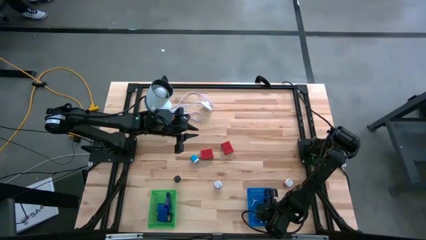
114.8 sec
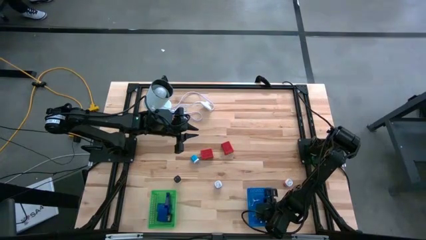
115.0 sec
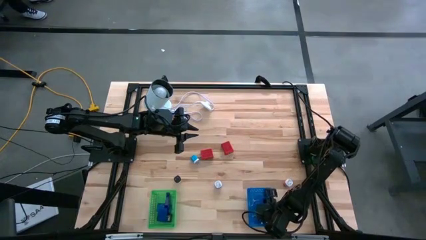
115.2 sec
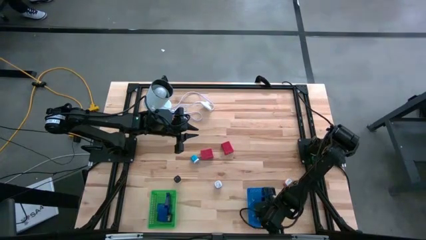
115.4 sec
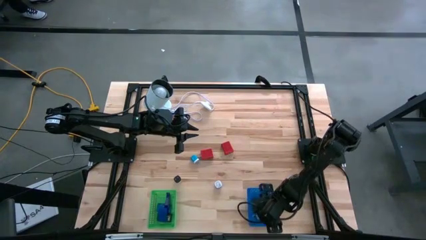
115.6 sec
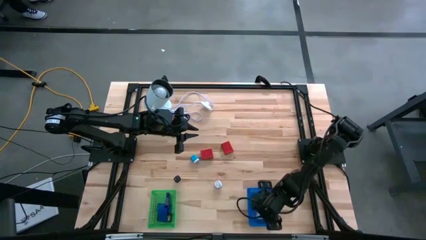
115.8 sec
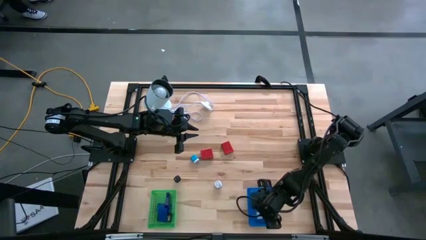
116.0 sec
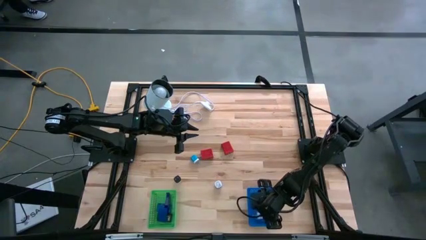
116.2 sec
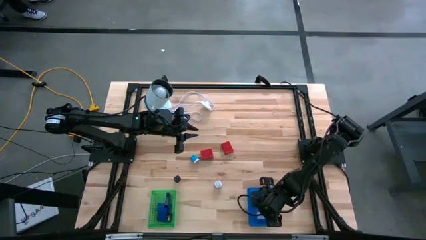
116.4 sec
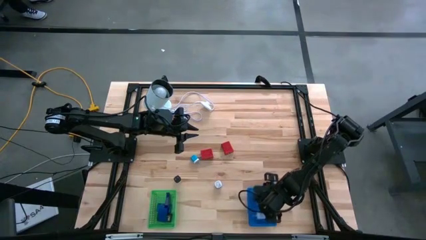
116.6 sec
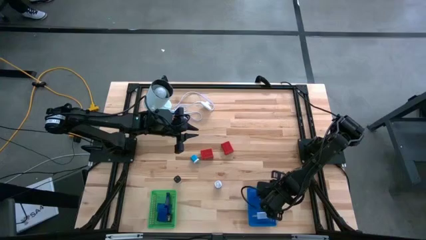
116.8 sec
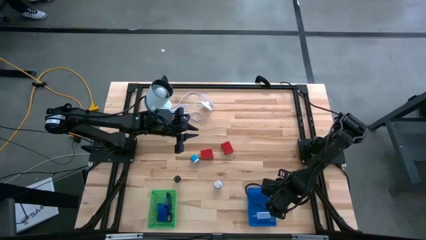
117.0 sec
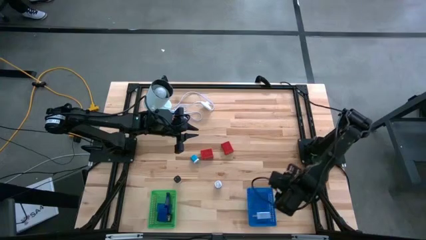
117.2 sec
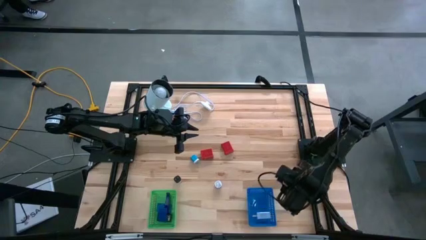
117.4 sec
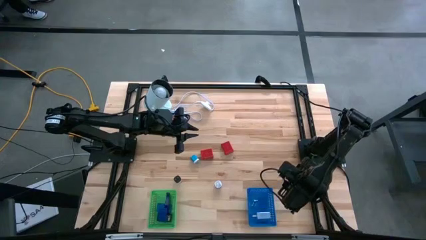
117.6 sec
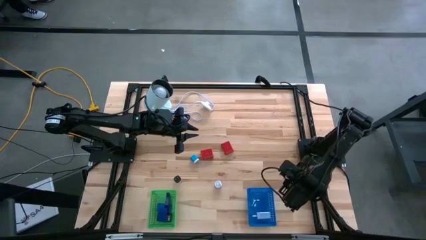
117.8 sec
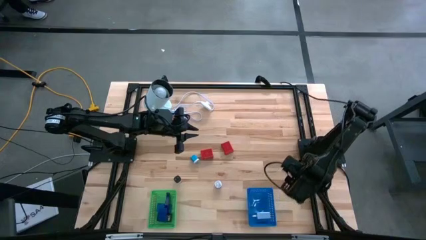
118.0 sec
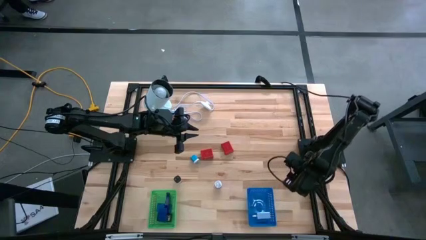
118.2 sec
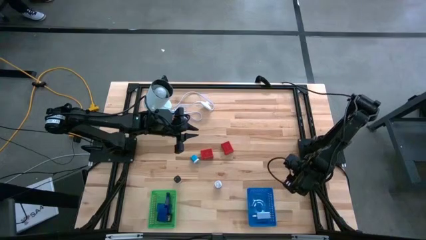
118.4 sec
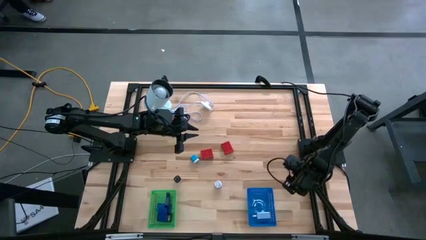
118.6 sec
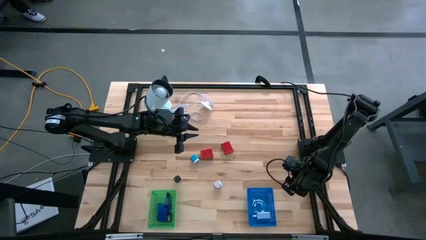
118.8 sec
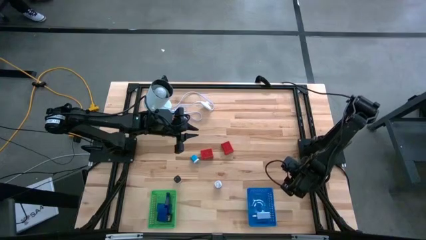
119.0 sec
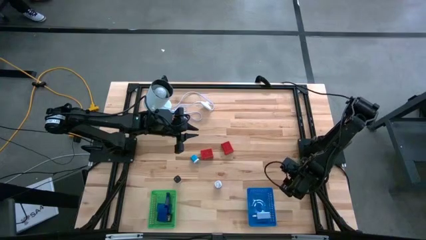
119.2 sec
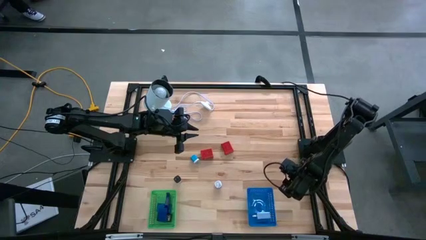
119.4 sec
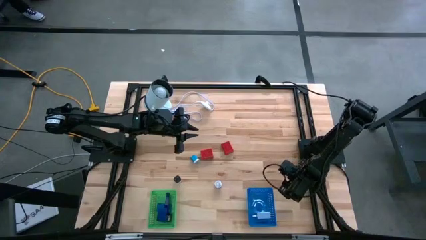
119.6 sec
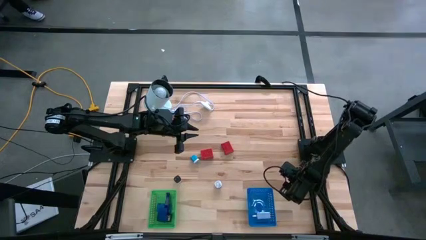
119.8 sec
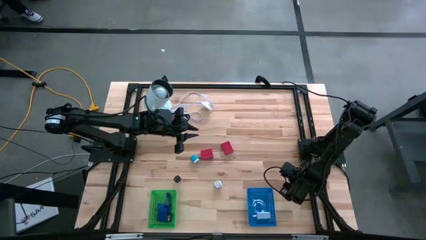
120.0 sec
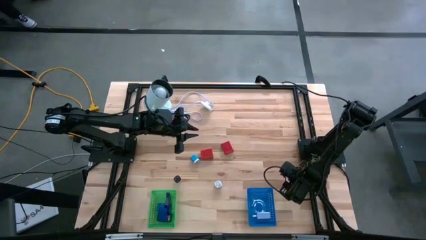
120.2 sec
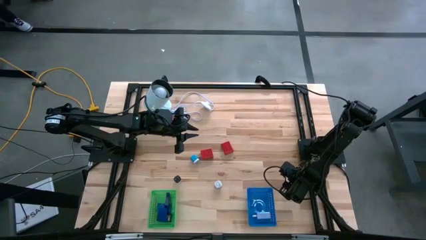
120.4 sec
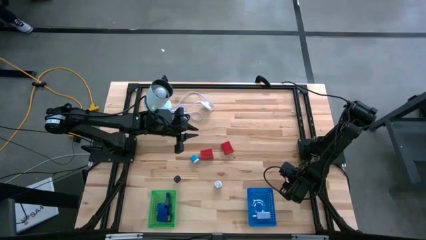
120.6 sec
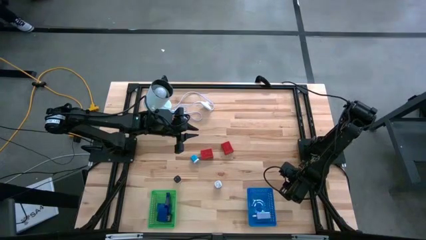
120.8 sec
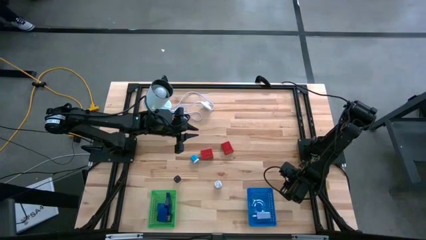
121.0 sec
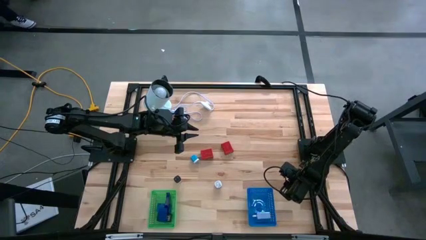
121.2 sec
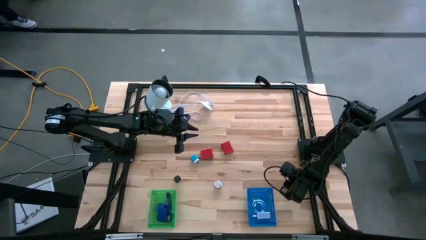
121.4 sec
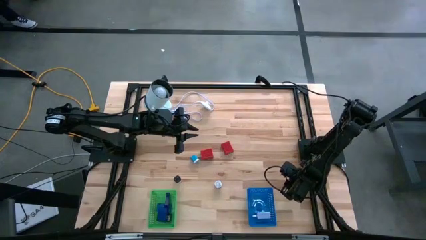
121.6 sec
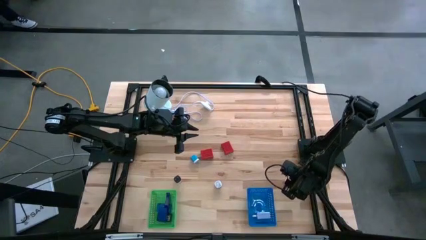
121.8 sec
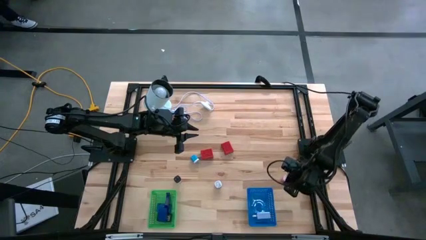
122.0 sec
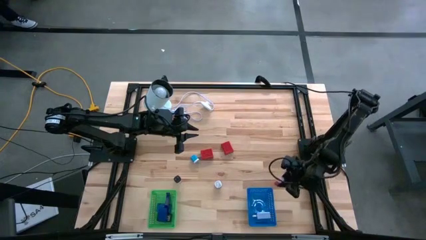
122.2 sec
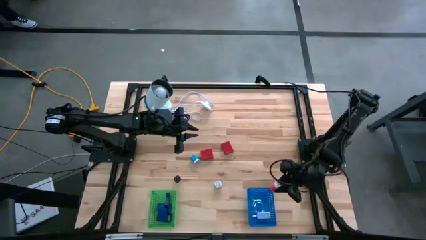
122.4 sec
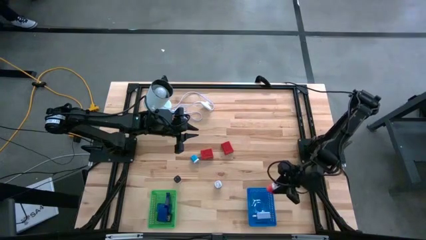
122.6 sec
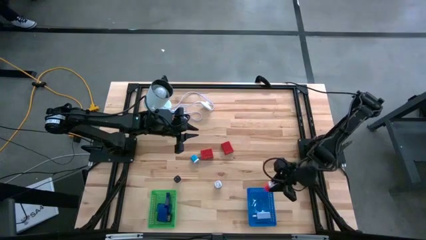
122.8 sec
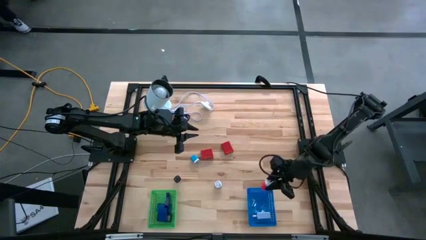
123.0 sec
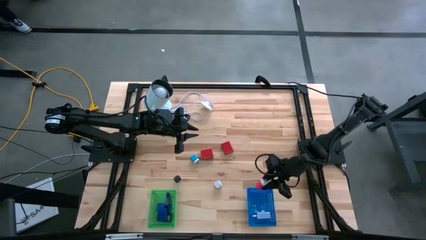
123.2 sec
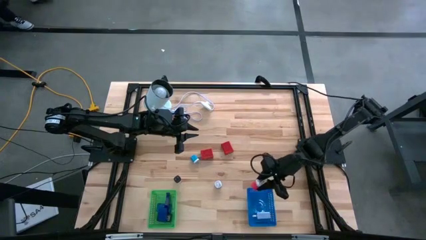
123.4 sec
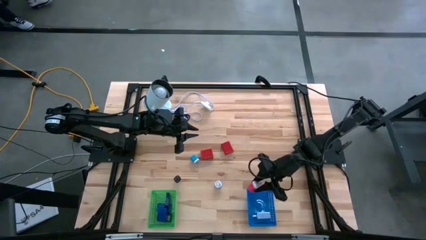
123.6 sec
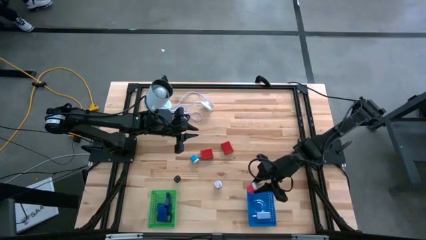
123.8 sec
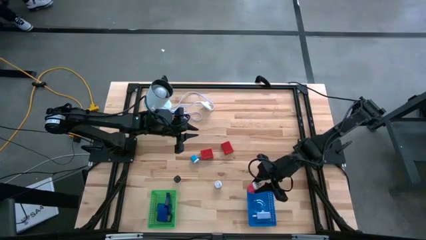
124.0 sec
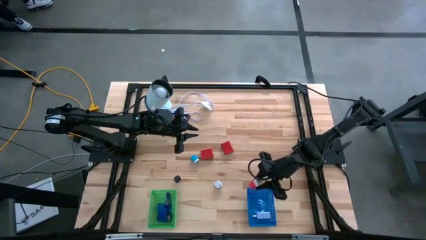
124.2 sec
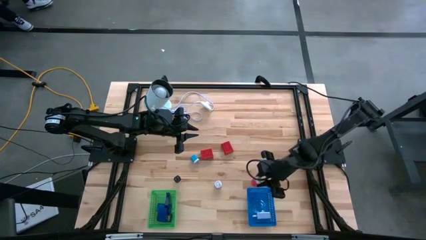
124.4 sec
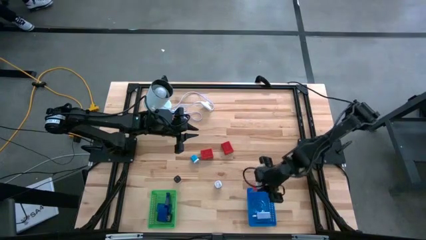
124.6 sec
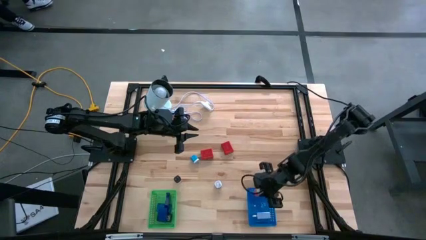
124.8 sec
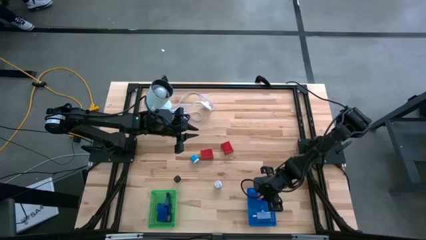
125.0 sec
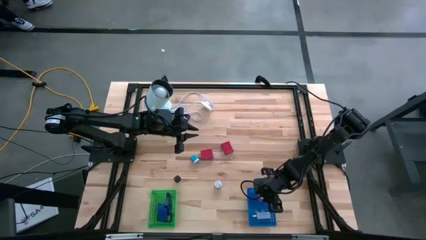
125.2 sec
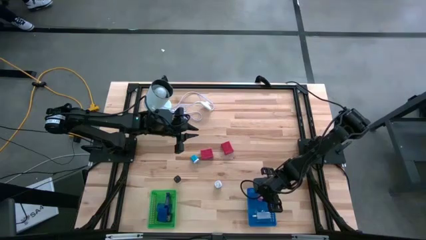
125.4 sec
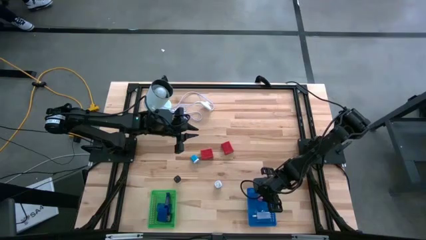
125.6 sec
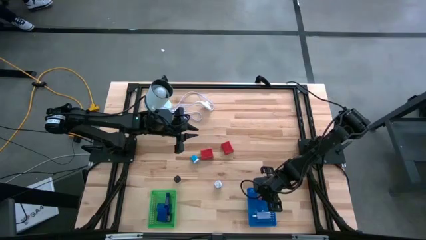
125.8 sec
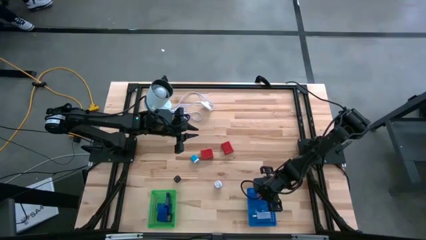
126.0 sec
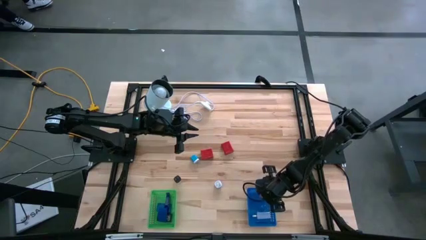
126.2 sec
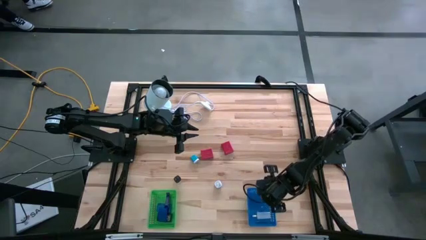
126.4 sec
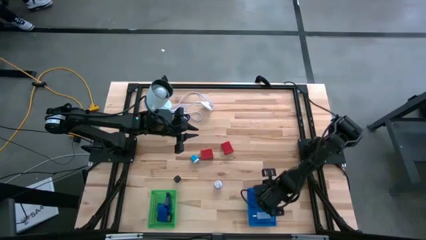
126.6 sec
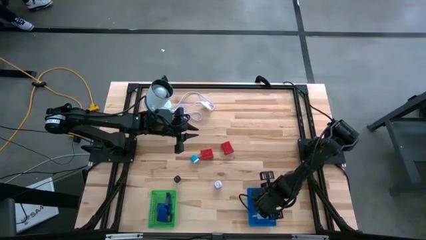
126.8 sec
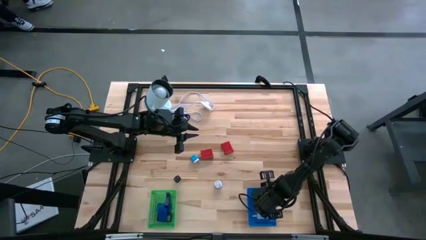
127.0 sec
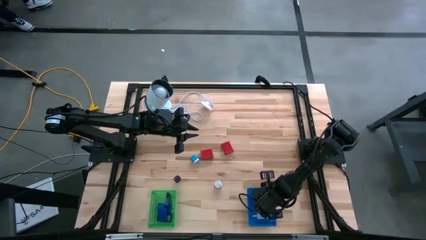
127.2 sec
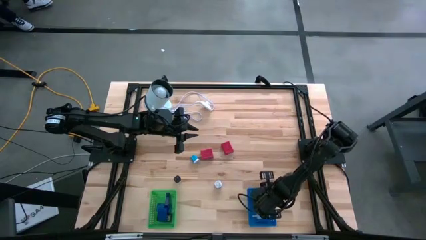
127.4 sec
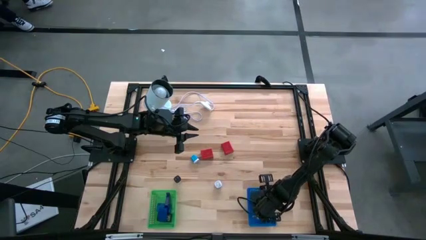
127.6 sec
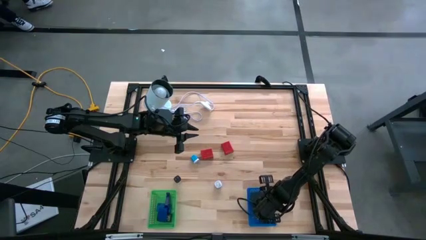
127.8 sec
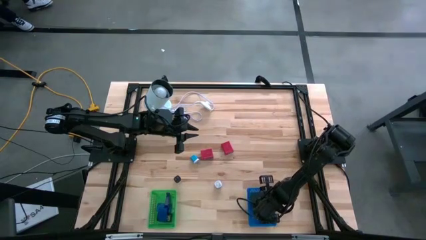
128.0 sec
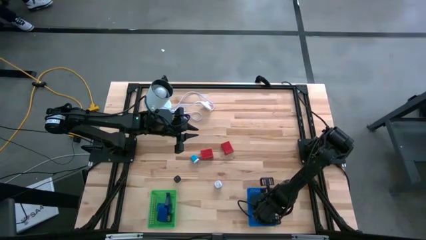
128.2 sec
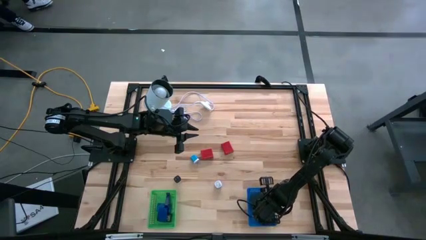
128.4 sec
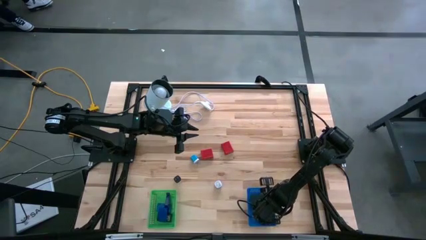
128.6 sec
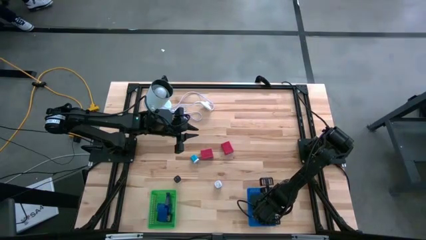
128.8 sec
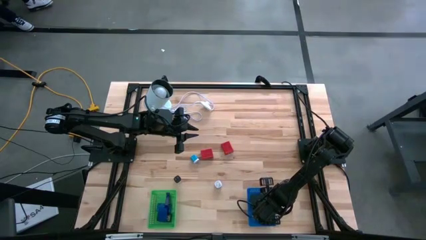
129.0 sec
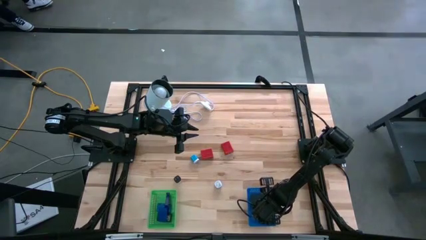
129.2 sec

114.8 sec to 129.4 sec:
Task: Pick & Place Office items
Put the pink charger adapter into the blue bin

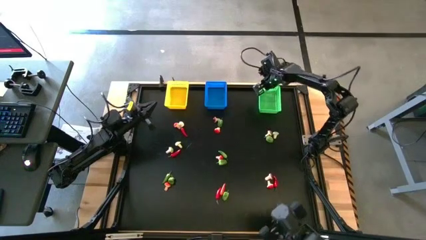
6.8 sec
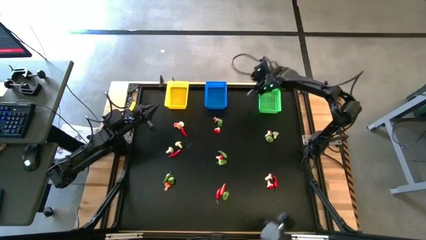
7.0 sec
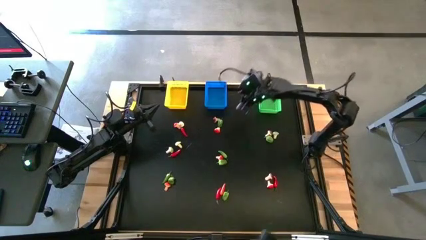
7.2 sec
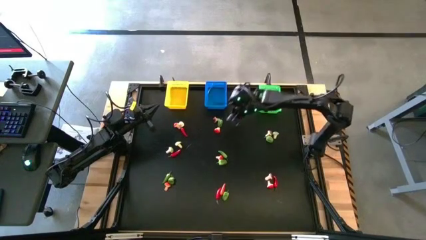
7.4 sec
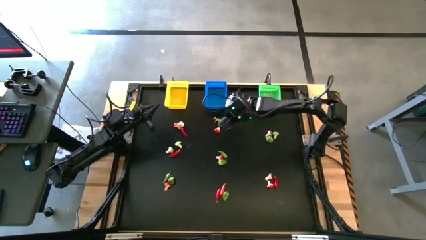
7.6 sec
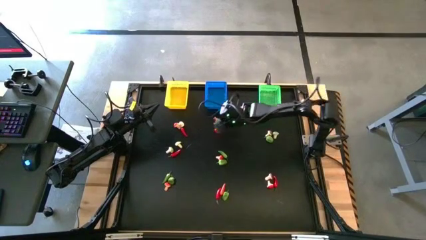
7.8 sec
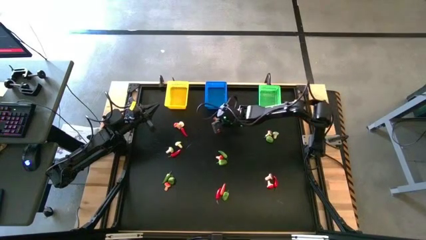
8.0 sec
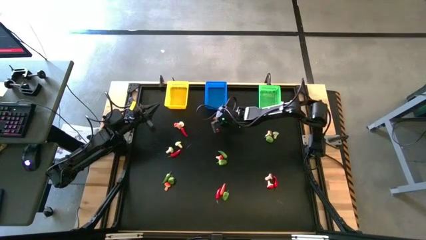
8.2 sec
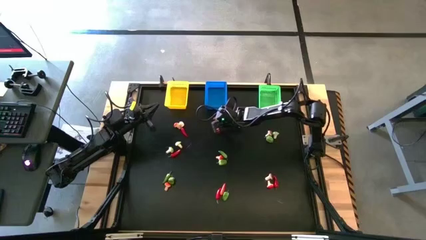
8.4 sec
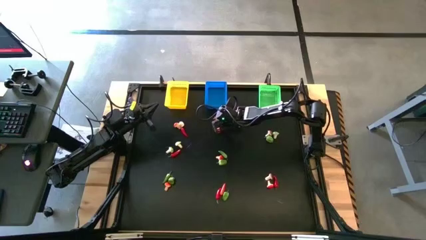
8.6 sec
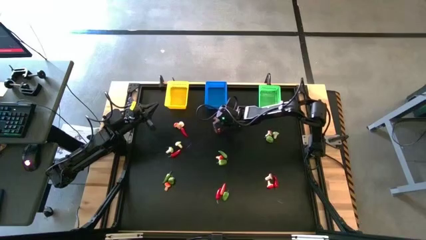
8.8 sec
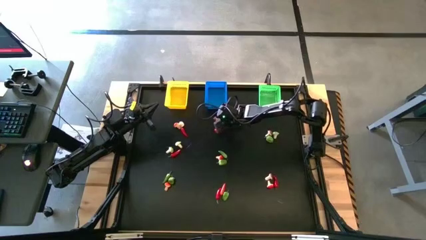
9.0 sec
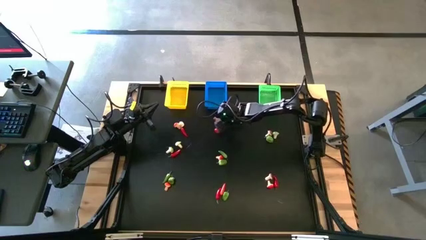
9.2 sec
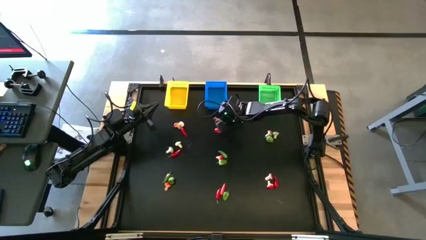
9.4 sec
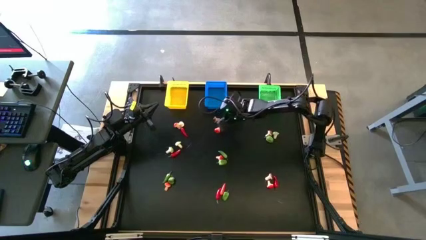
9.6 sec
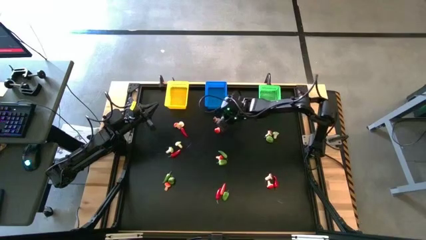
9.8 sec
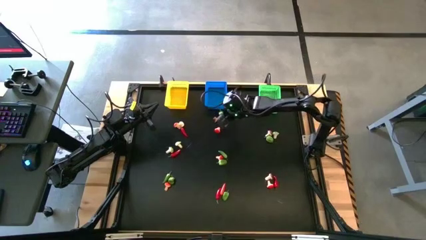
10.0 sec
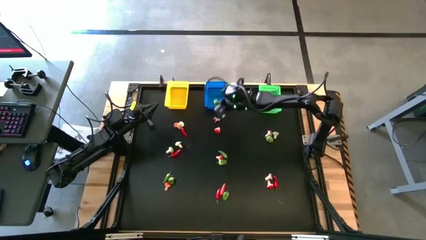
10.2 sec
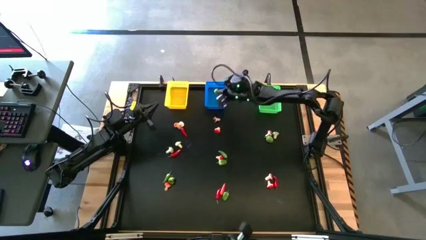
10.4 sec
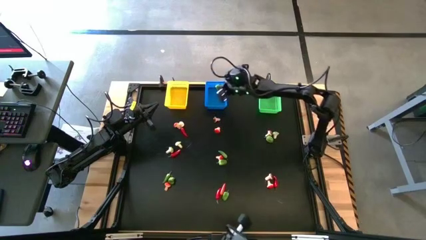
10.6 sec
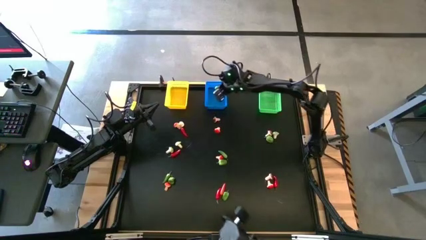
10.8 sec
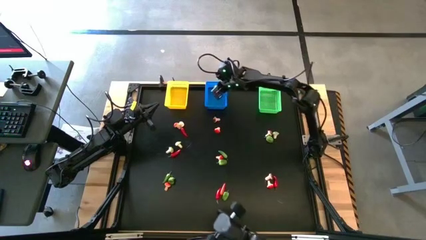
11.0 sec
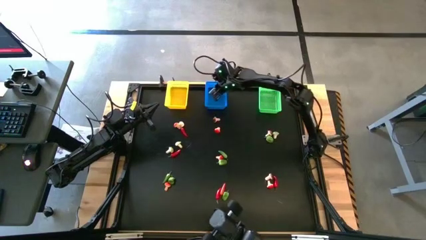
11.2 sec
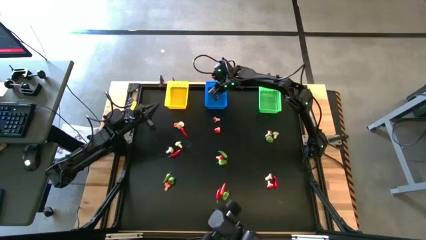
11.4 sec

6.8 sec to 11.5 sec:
Task: Sort produce into baskets
Put the green chili pepper into the blue bin
